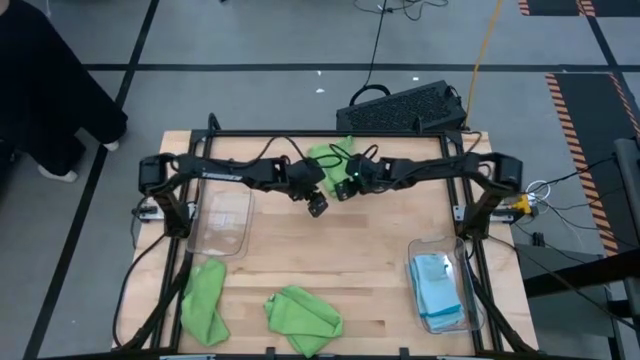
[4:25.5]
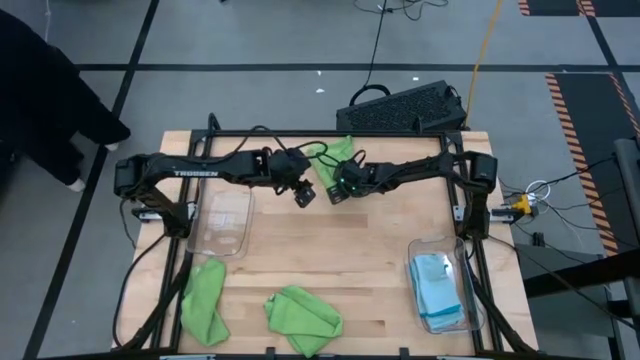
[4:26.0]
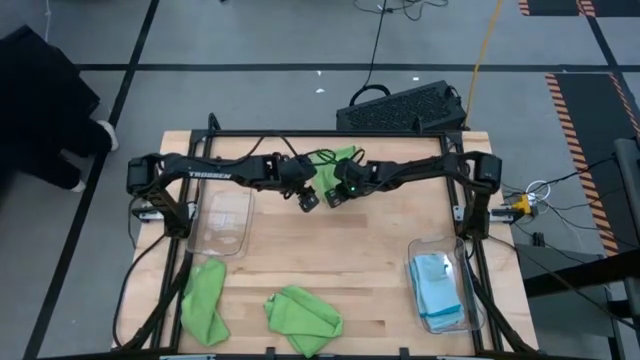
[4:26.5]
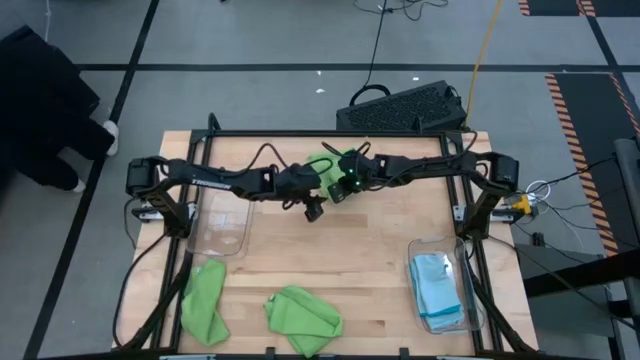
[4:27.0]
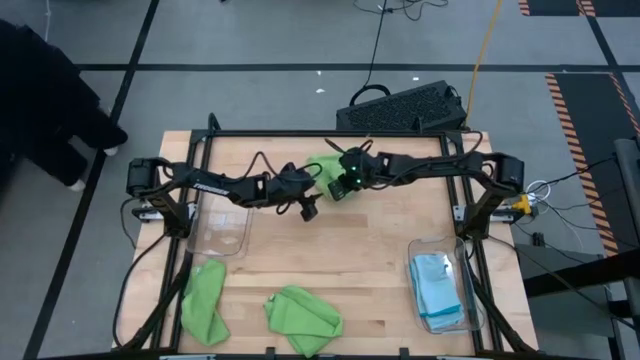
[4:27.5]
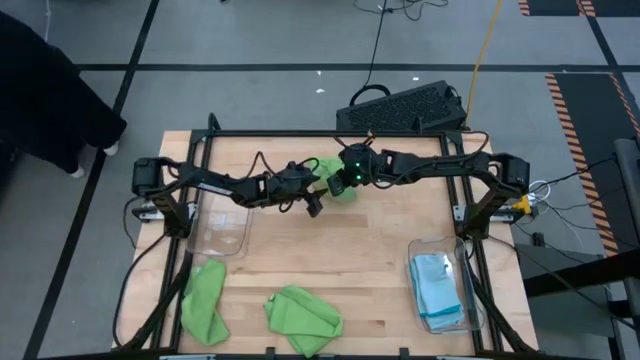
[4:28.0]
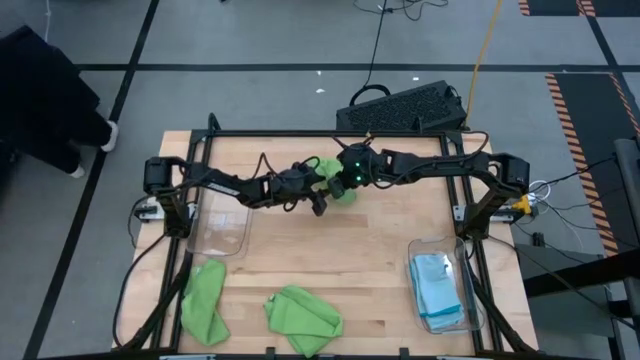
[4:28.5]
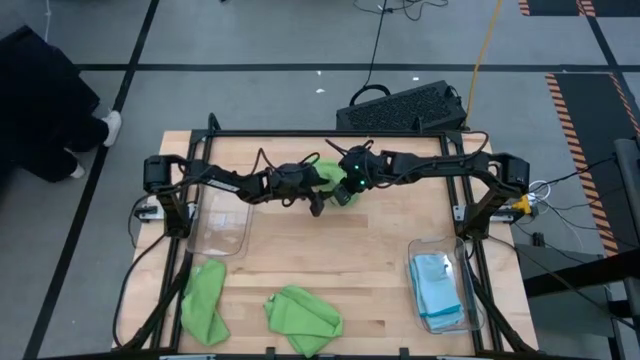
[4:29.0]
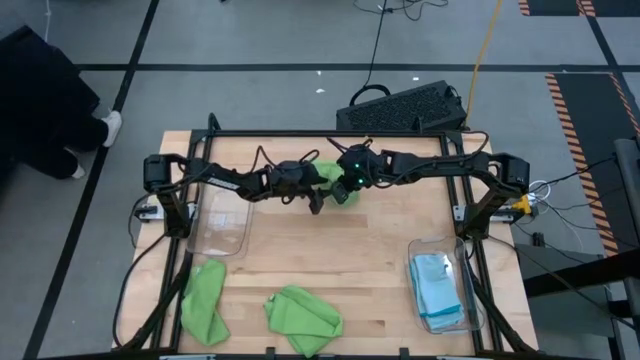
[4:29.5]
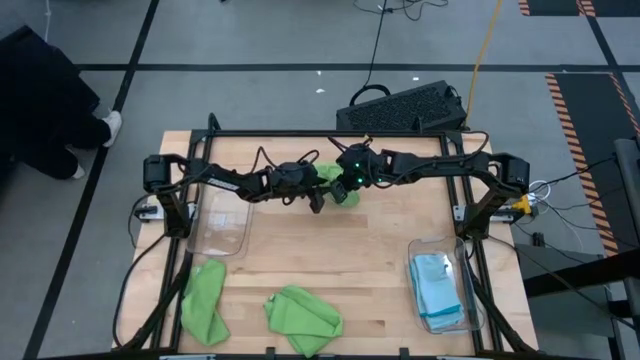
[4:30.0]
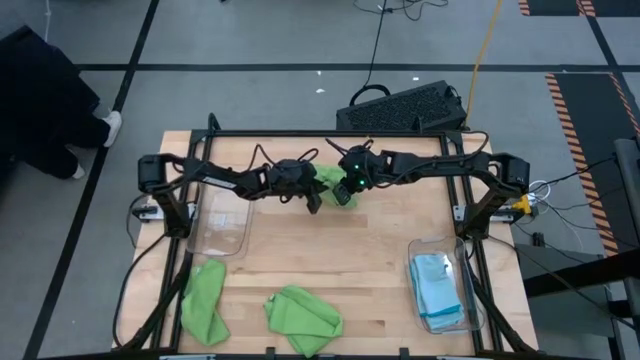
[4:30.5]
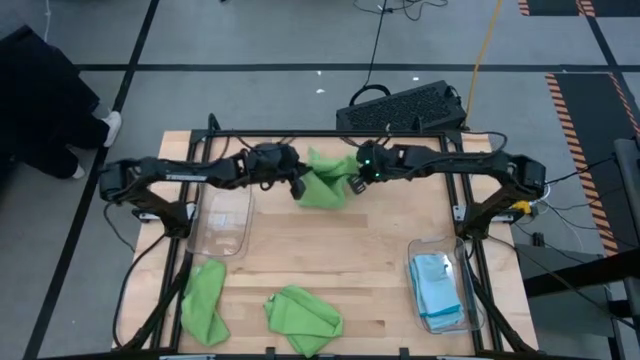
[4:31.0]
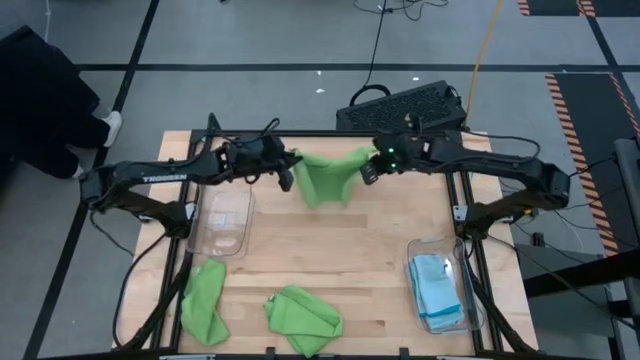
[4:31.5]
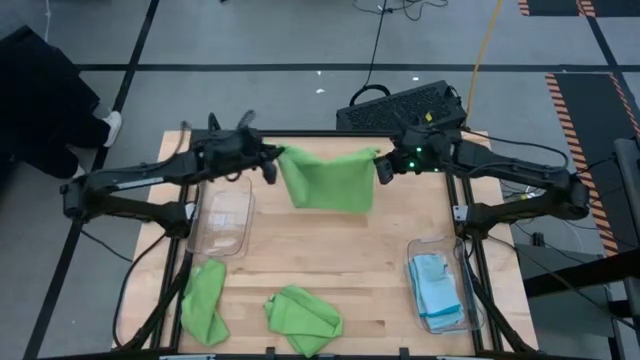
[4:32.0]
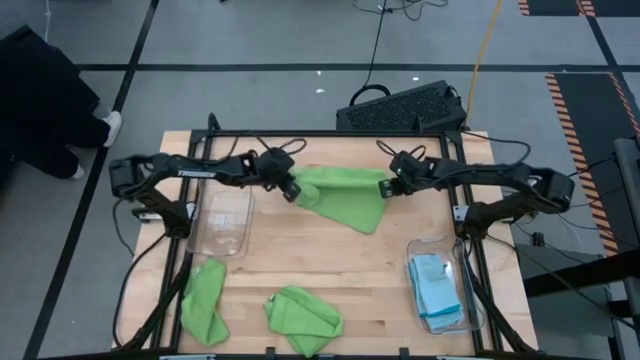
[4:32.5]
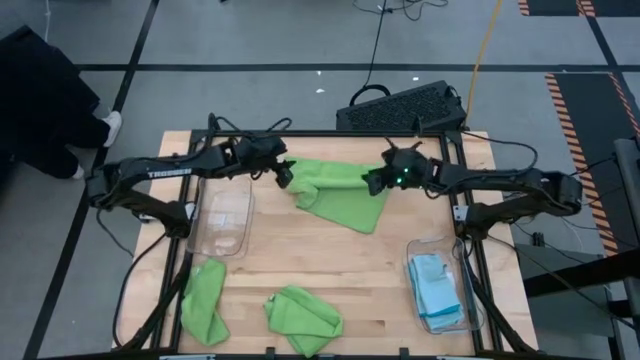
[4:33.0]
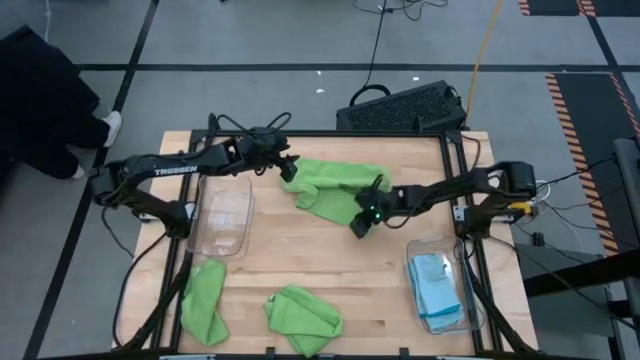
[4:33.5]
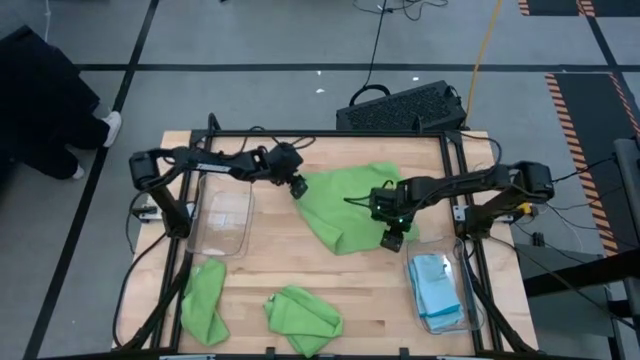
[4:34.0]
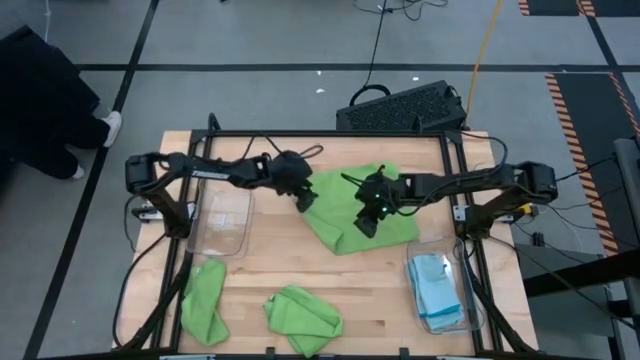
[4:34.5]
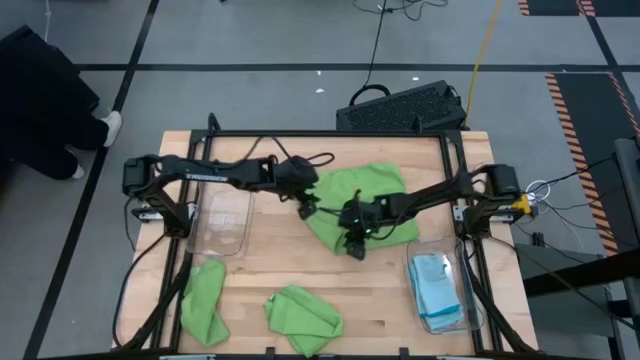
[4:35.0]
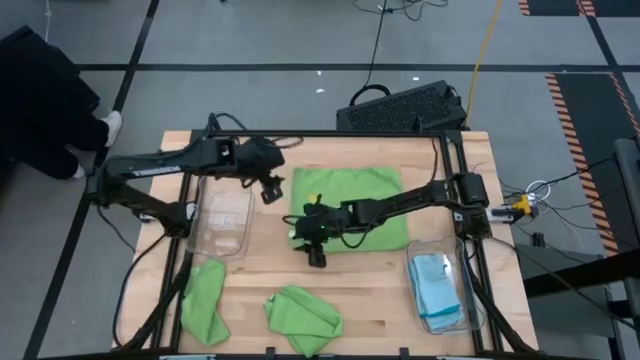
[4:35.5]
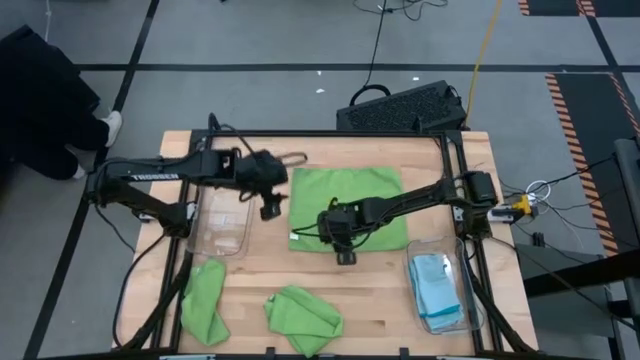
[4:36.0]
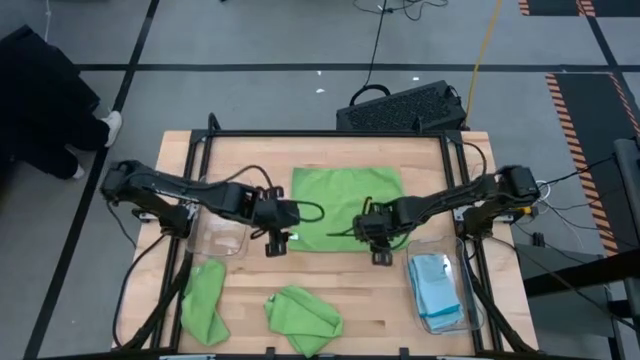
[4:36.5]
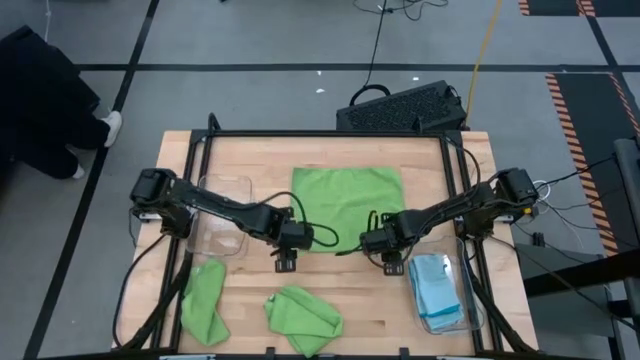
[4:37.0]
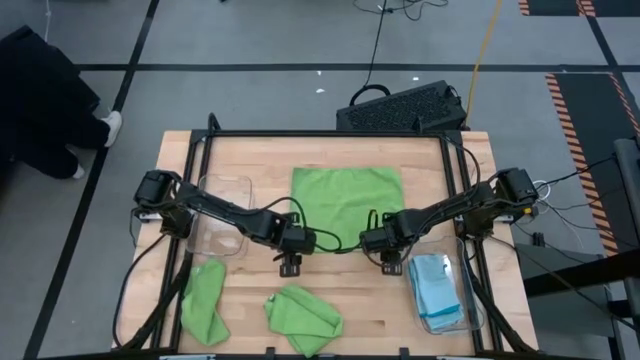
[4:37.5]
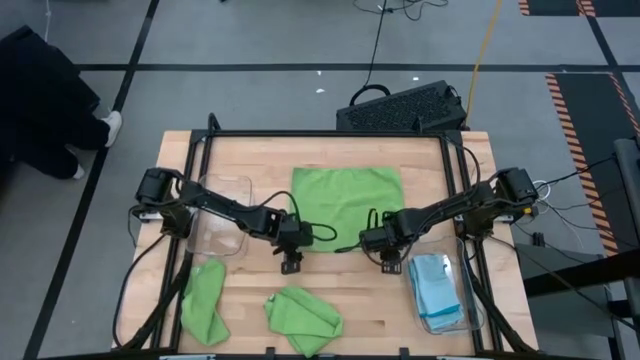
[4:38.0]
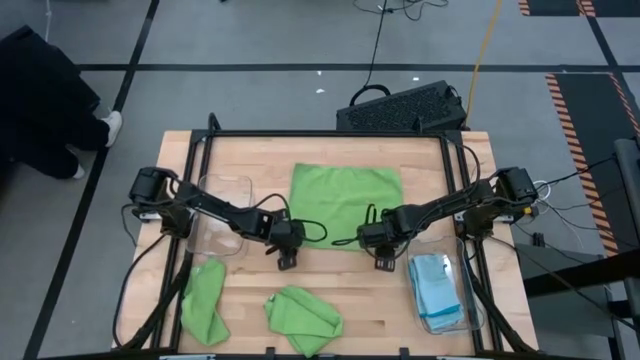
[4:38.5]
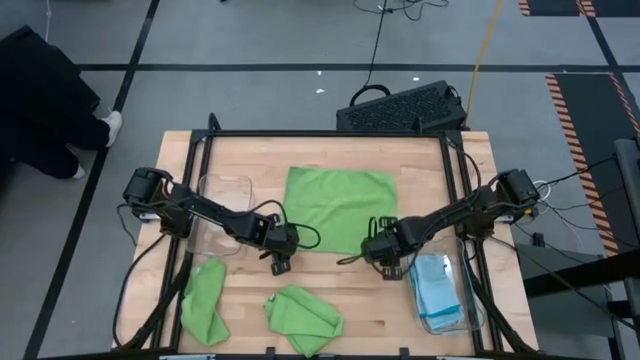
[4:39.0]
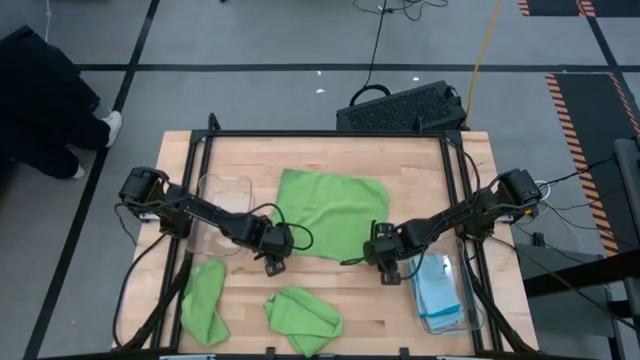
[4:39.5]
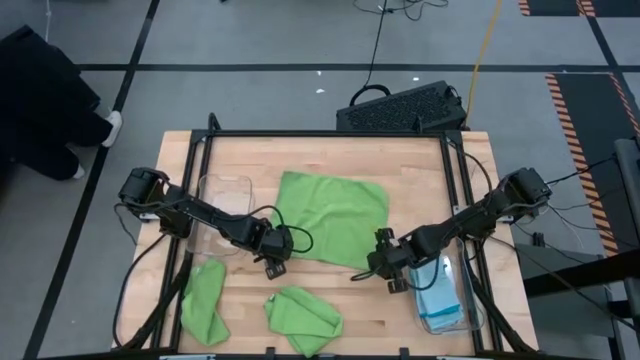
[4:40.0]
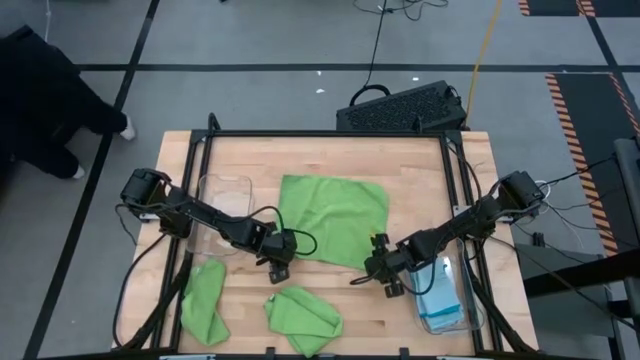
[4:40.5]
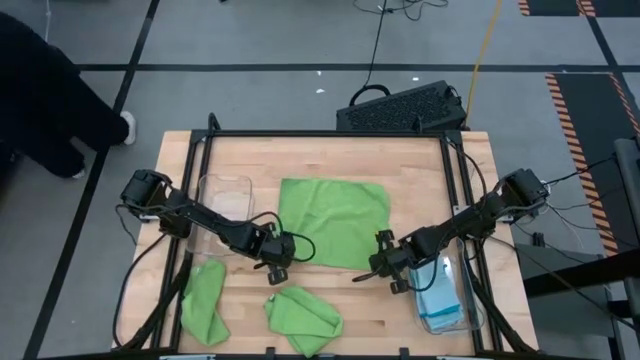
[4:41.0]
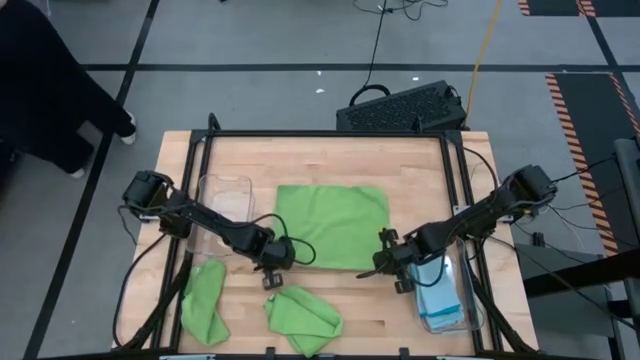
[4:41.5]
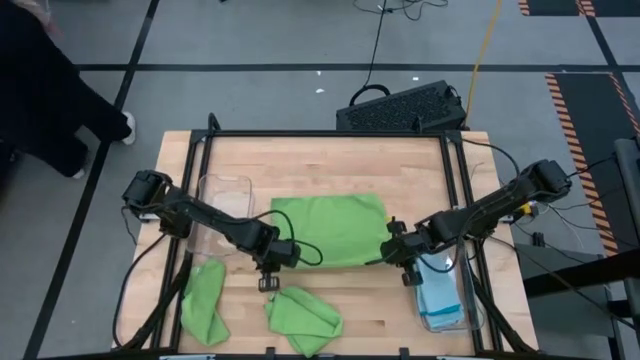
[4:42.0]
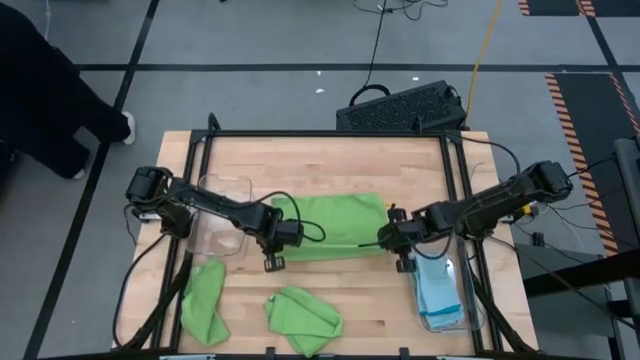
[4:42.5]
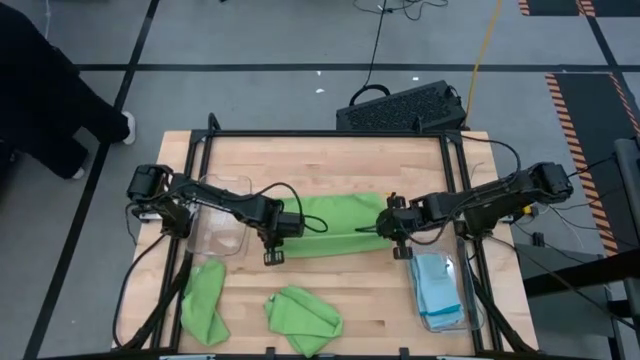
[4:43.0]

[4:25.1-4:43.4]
Task: Sort microfiber towel by color & place in baskets
Fold the top green microfiber towel

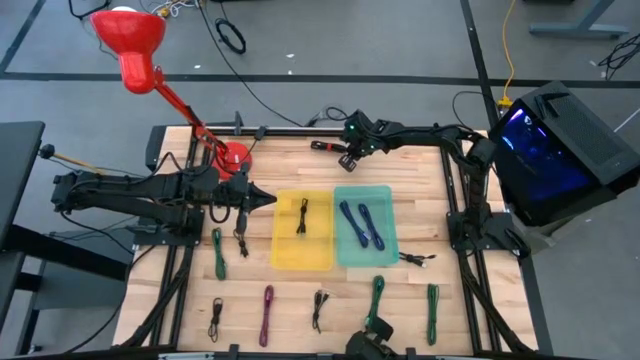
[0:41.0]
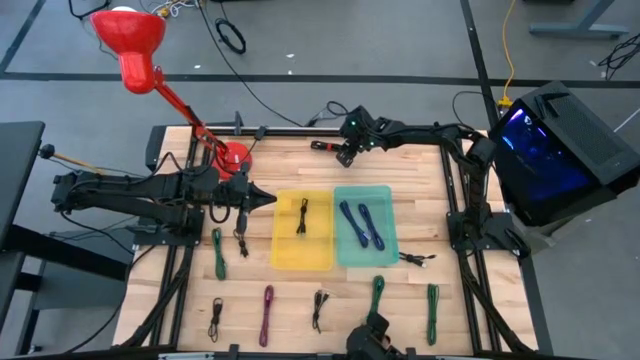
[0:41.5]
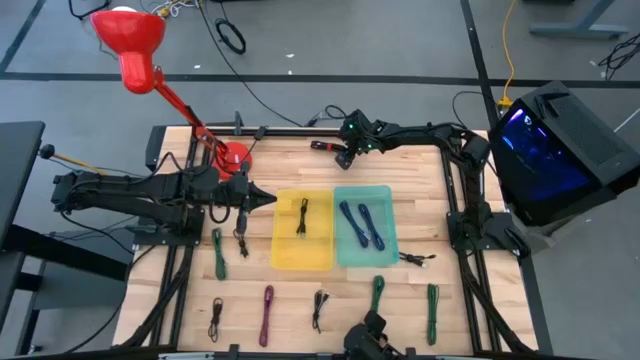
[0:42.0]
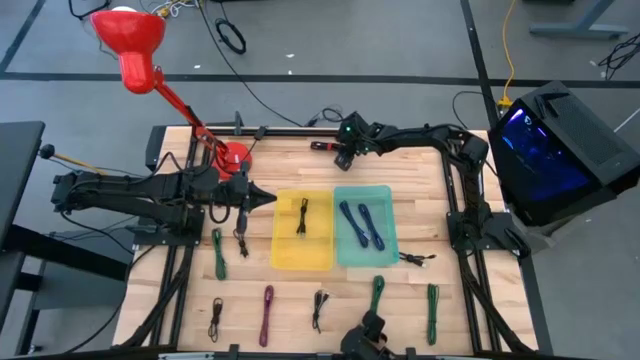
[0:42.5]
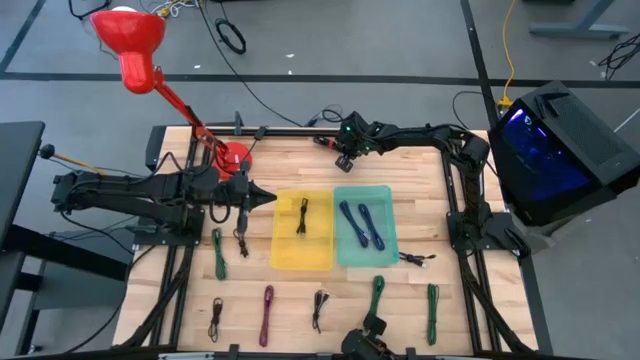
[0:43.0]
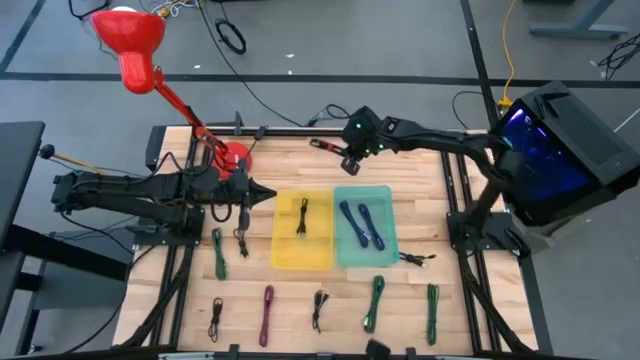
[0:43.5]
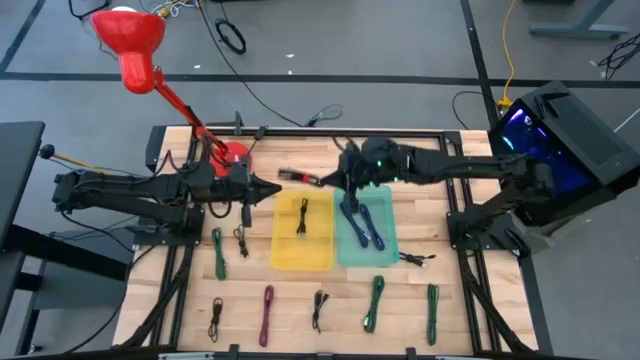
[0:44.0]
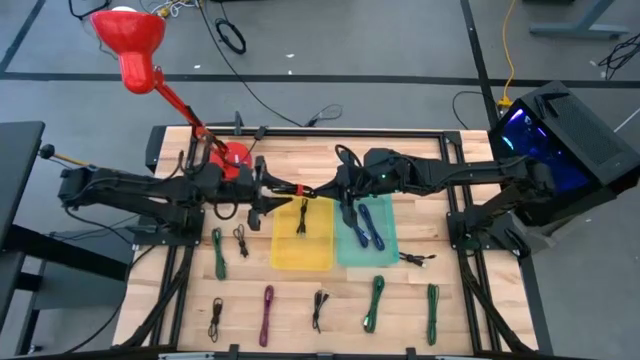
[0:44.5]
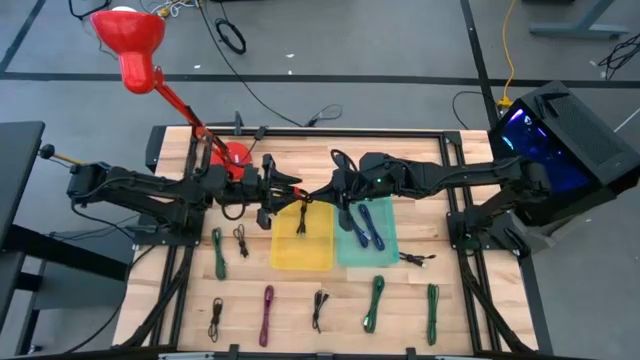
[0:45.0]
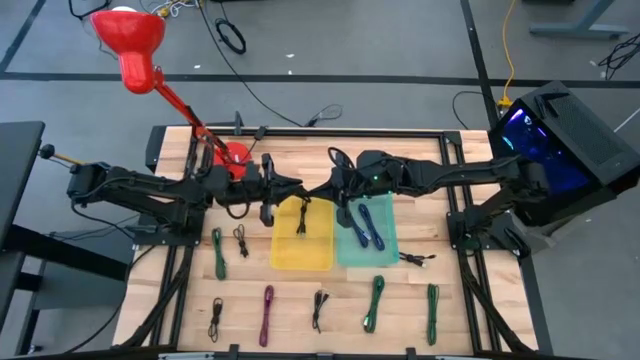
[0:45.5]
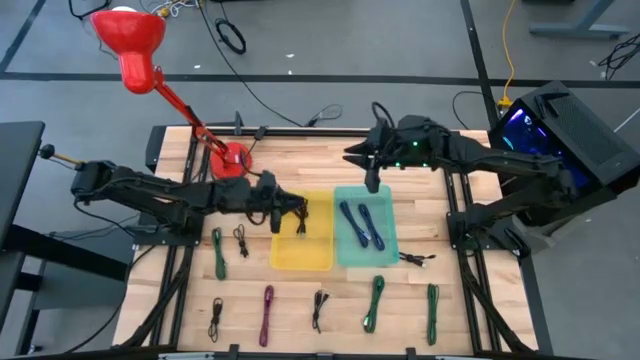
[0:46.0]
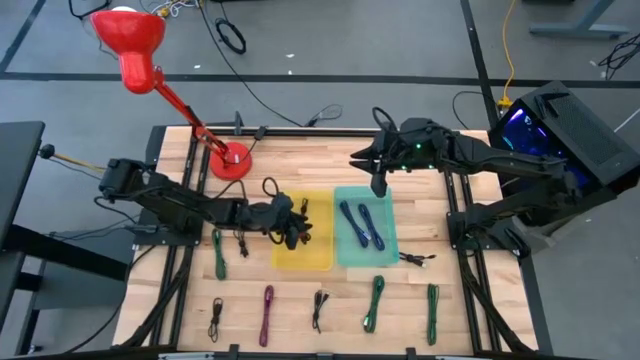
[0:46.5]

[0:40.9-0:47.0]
Task: Pick & Place USB Port
Put the black charger cable into the yellow bin
